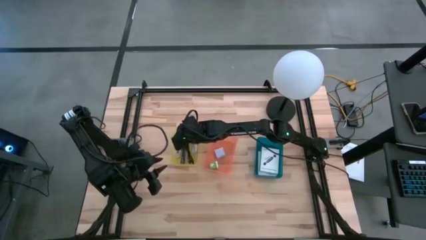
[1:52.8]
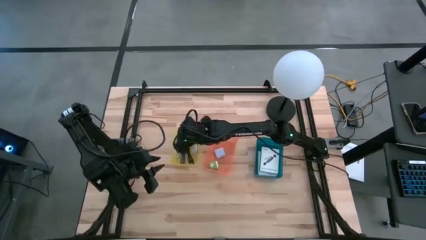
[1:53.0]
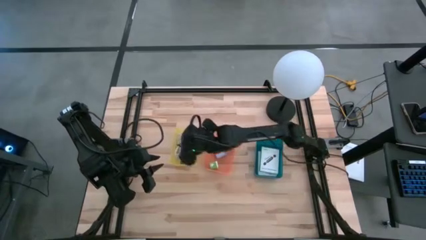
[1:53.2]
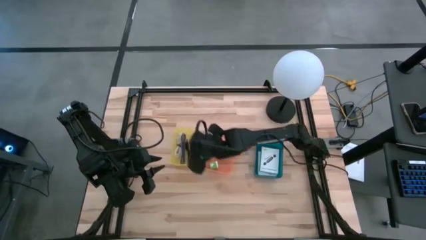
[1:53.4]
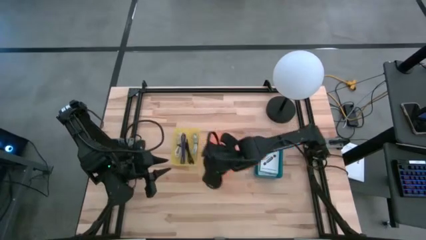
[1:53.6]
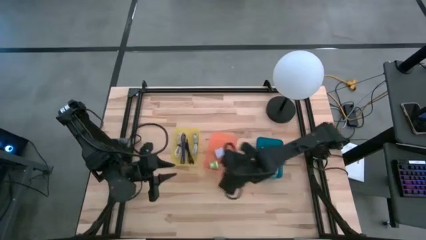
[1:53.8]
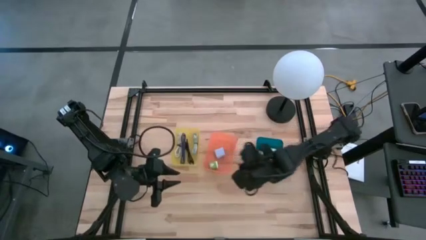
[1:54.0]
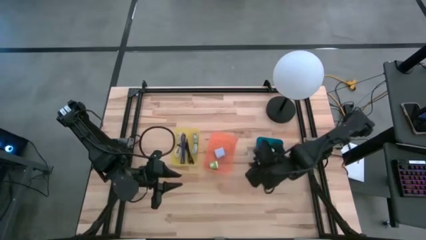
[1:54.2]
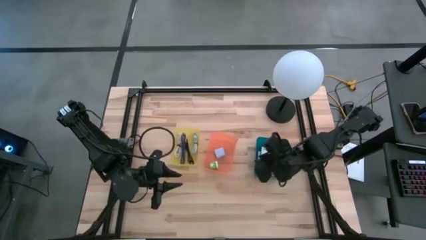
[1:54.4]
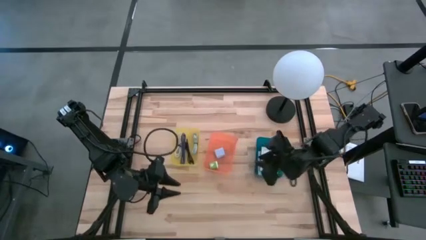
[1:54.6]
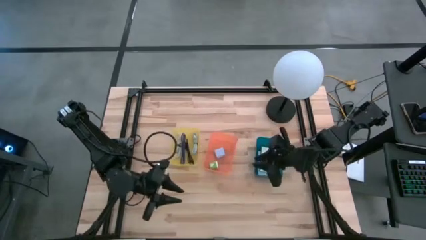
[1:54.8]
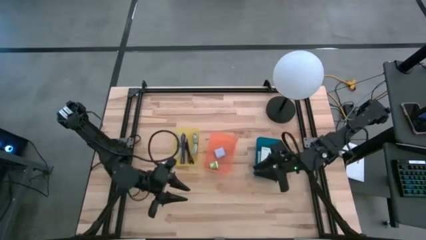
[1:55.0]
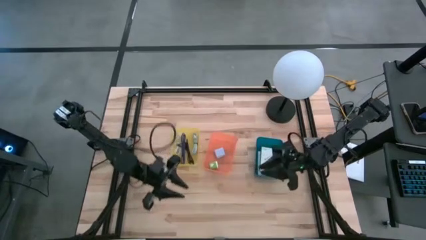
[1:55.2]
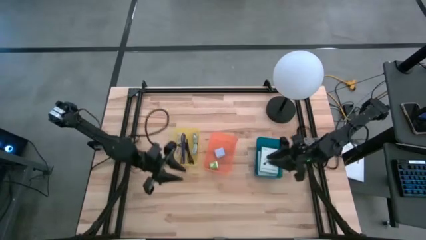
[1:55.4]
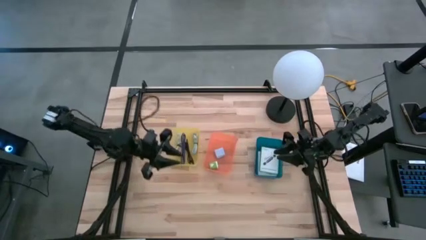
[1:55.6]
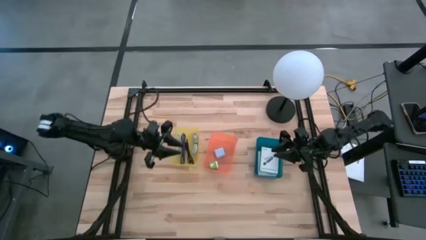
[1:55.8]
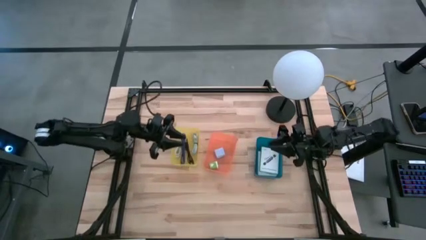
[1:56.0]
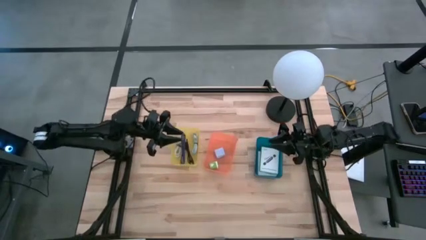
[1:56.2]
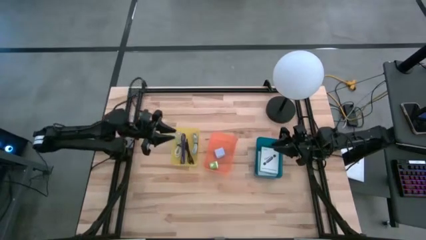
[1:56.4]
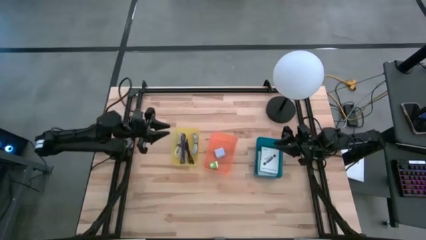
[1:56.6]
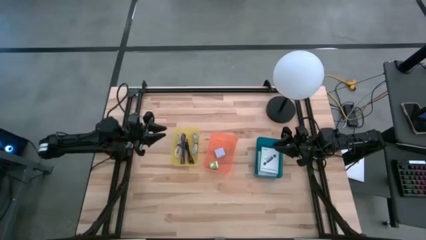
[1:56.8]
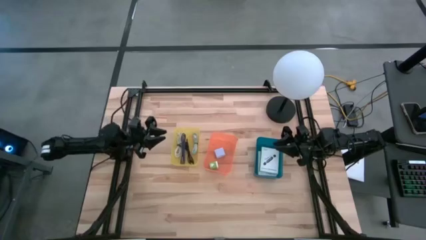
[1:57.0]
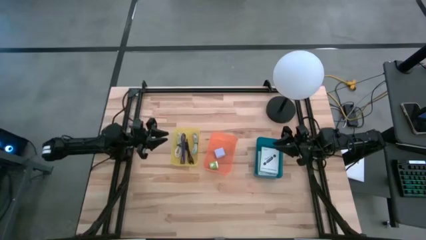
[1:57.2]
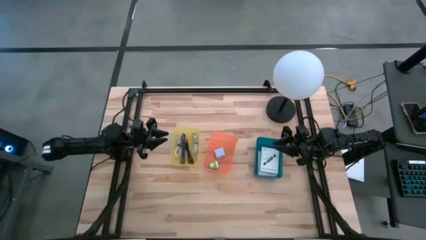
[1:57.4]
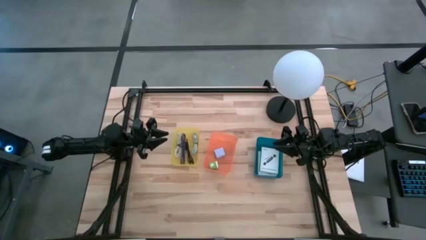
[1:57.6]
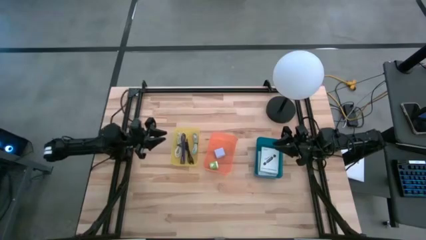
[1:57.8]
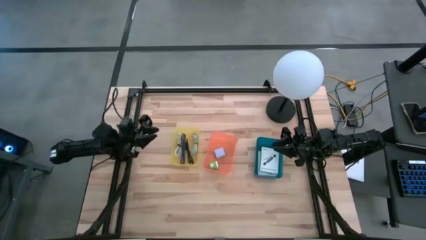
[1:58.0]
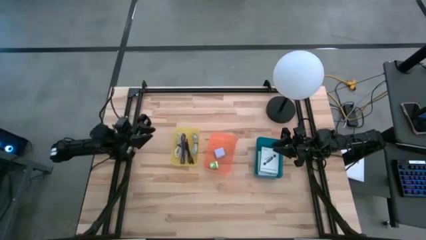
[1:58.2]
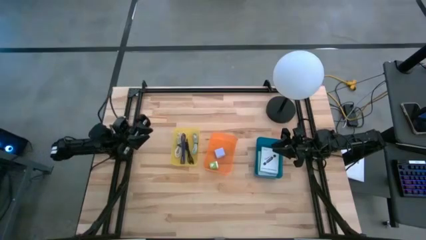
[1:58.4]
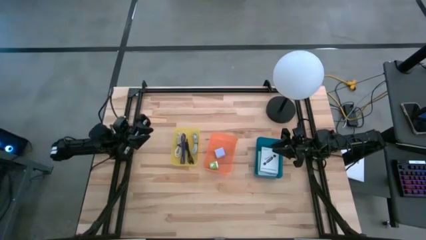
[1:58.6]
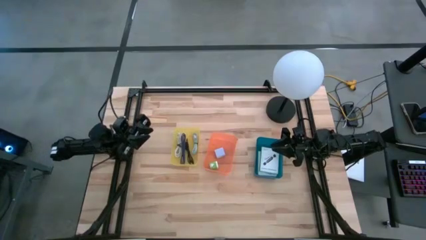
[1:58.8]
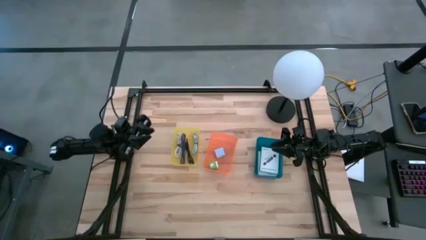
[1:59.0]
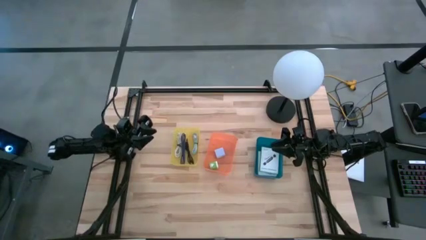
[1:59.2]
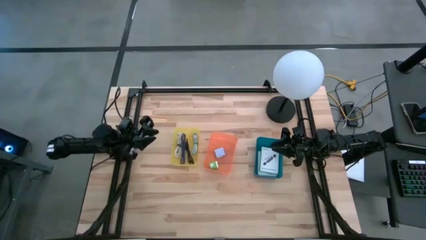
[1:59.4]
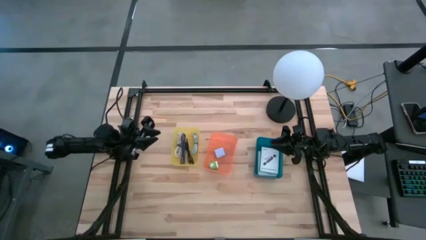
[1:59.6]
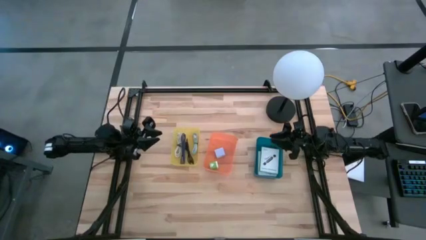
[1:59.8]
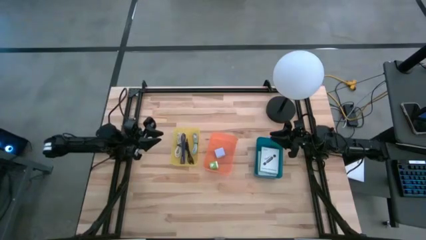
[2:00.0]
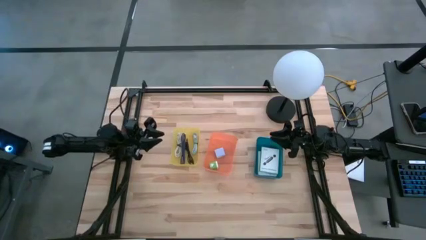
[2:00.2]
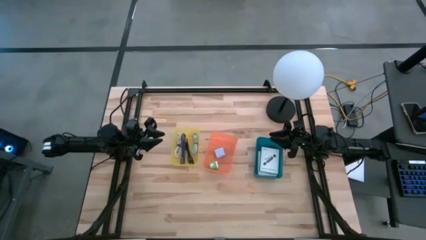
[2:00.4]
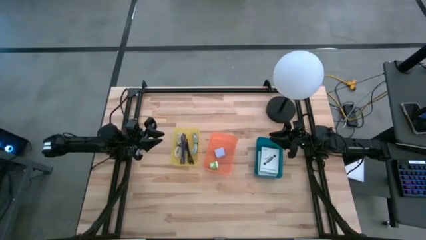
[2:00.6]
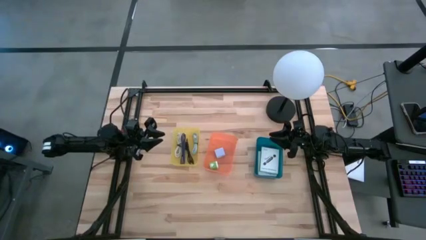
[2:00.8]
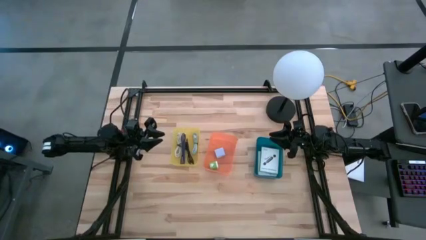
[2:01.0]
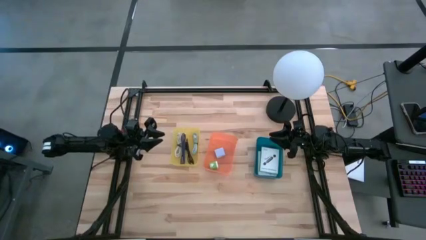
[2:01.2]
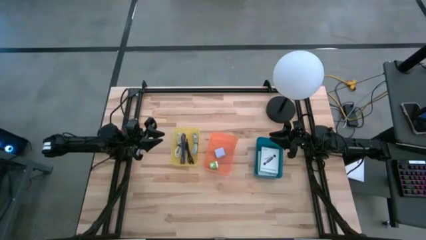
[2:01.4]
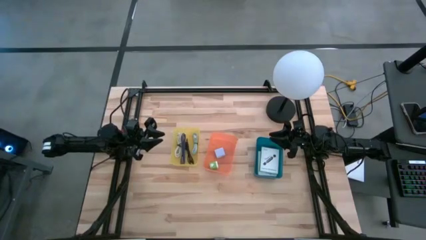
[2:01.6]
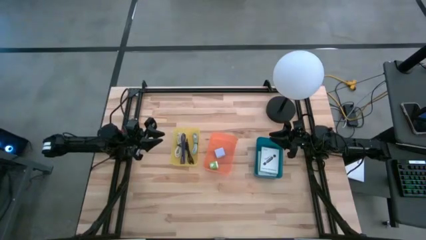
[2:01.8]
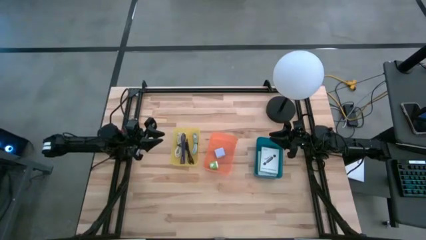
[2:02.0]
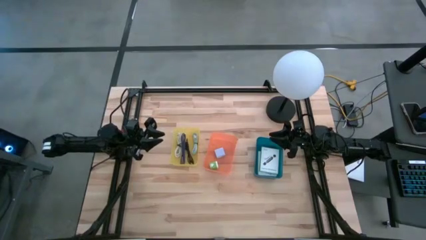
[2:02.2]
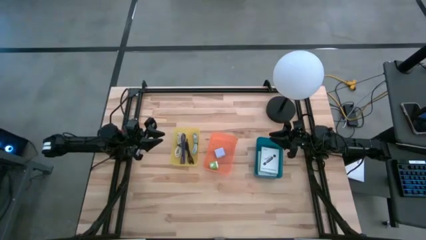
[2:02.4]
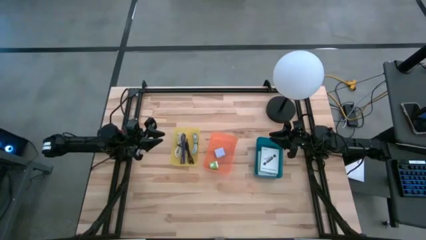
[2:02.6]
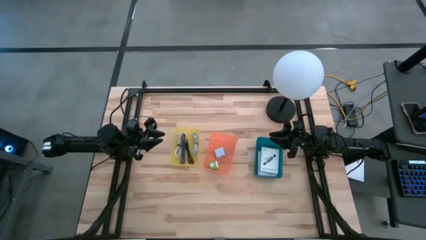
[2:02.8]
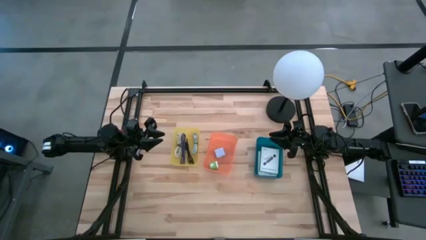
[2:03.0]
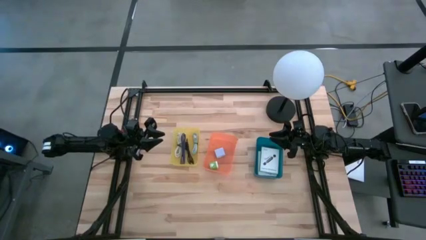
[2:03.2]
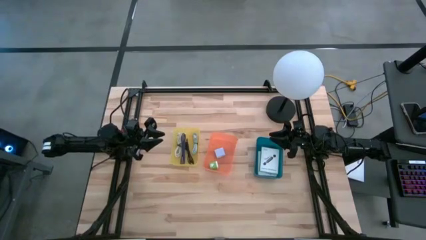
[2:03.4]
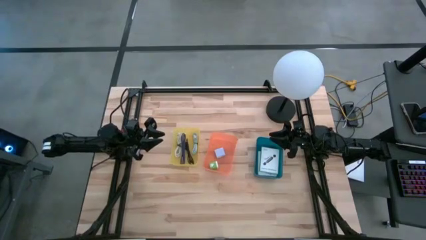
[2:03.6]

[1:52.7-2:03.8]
Task: Pick and place items into bin
Return to Home Position

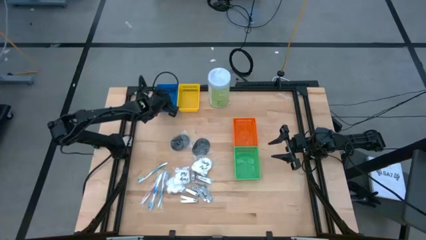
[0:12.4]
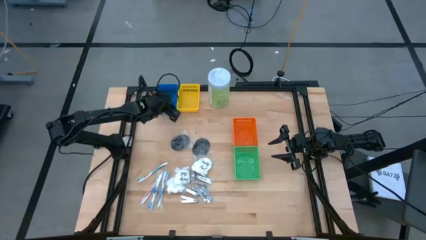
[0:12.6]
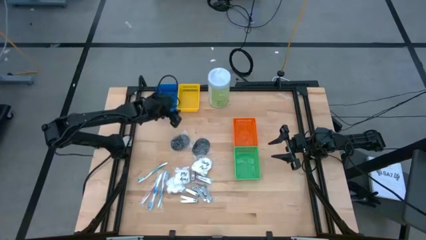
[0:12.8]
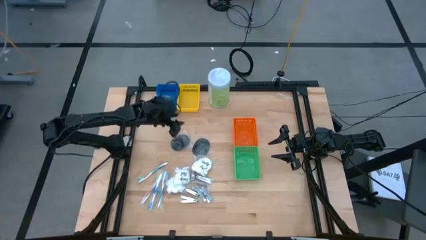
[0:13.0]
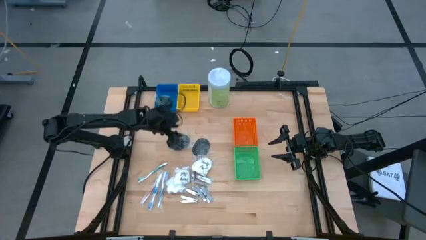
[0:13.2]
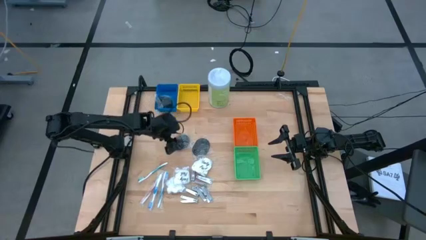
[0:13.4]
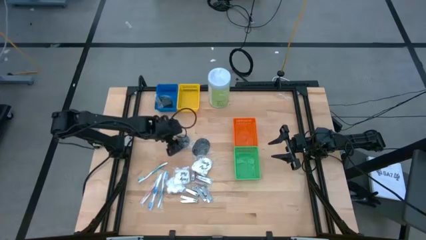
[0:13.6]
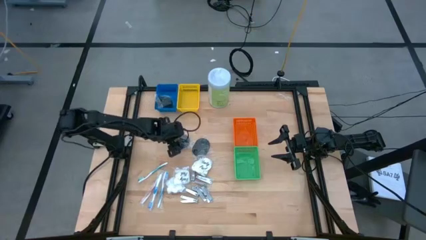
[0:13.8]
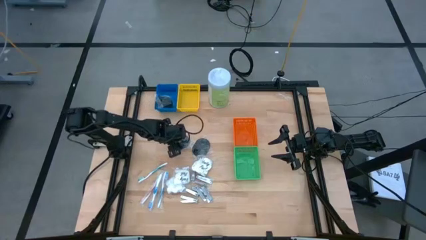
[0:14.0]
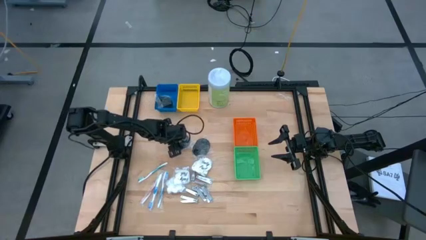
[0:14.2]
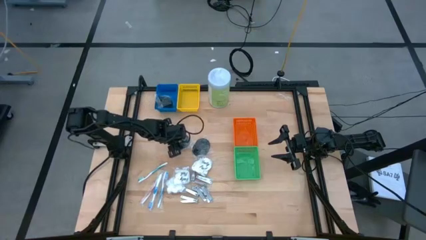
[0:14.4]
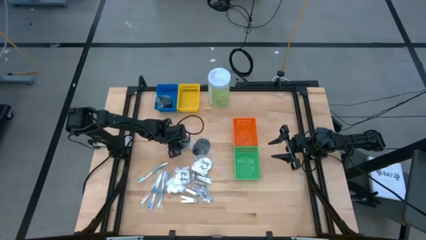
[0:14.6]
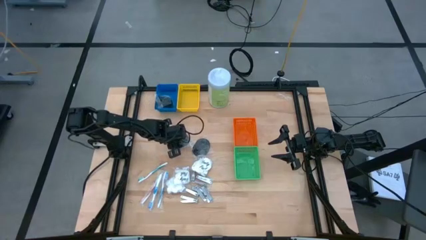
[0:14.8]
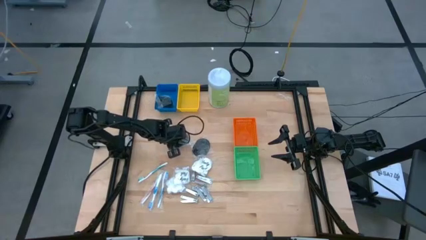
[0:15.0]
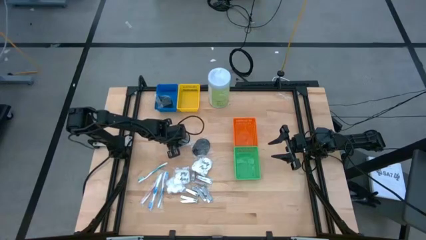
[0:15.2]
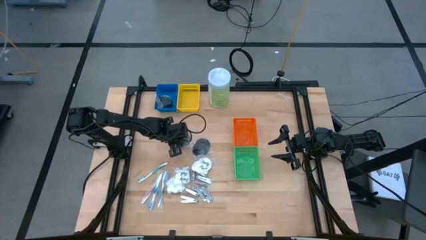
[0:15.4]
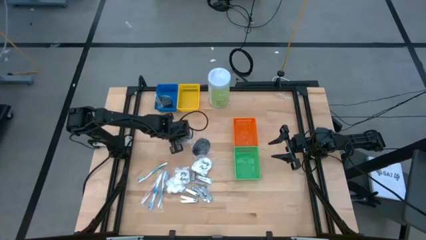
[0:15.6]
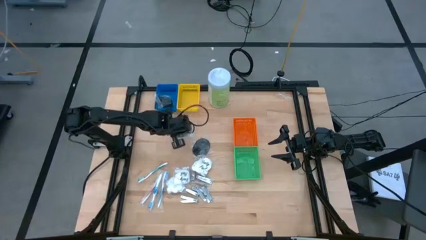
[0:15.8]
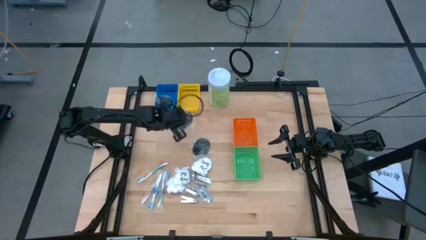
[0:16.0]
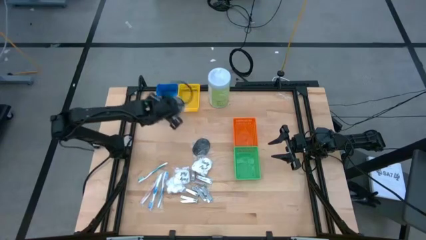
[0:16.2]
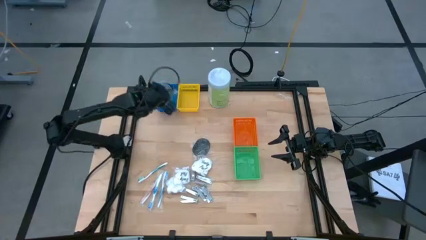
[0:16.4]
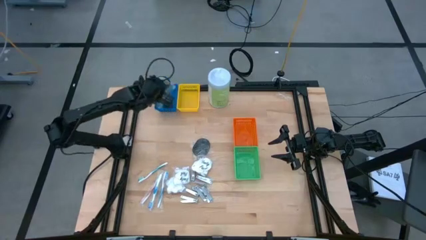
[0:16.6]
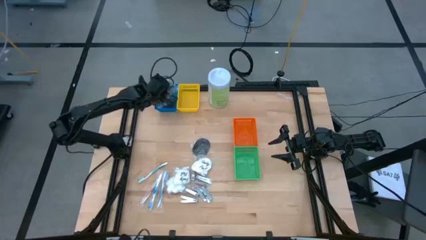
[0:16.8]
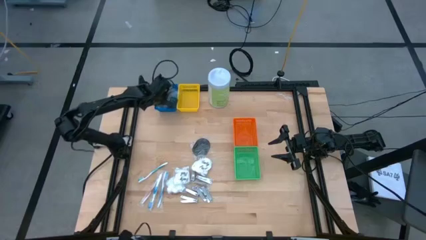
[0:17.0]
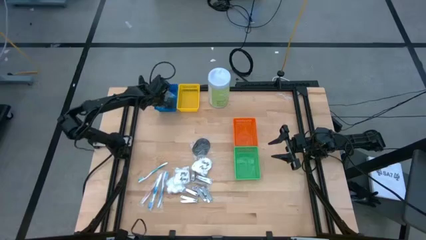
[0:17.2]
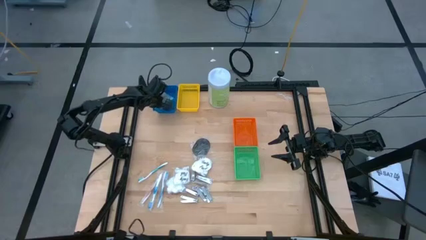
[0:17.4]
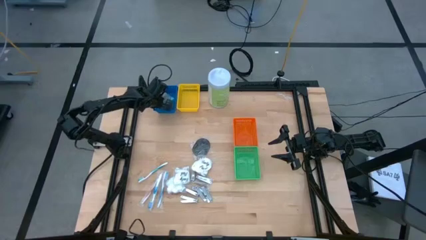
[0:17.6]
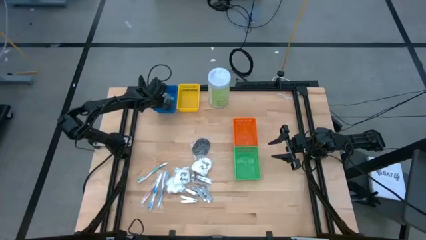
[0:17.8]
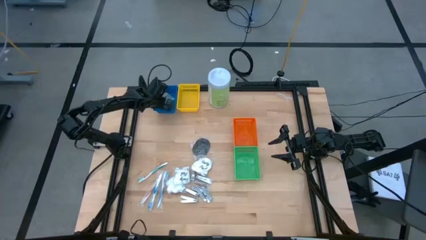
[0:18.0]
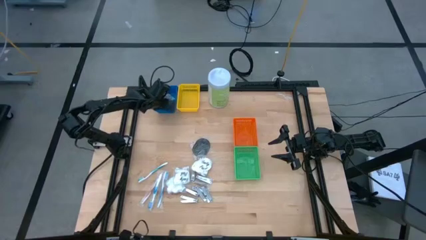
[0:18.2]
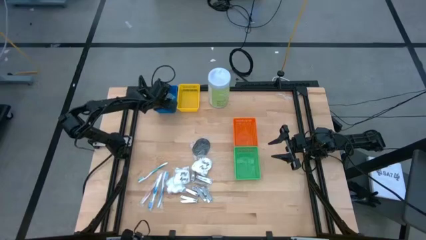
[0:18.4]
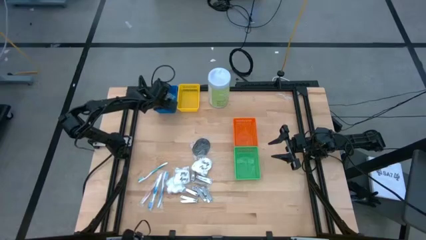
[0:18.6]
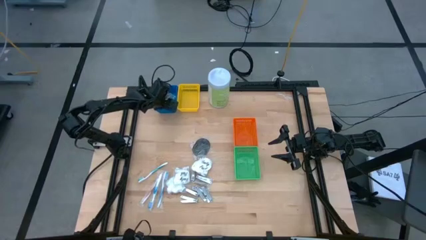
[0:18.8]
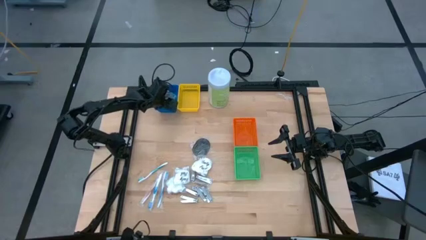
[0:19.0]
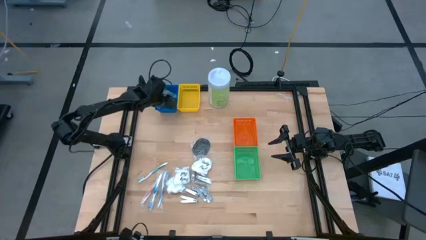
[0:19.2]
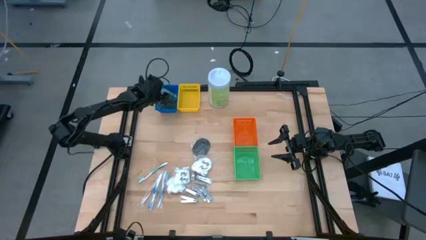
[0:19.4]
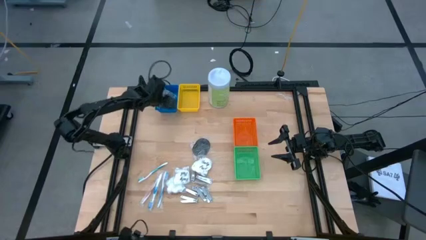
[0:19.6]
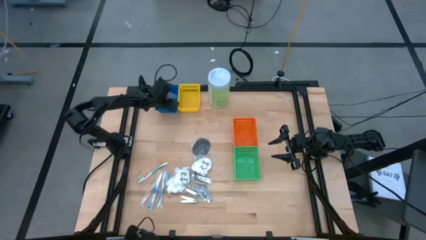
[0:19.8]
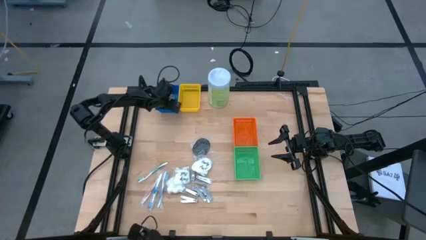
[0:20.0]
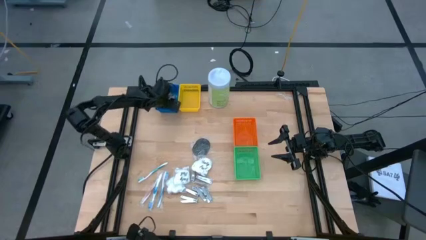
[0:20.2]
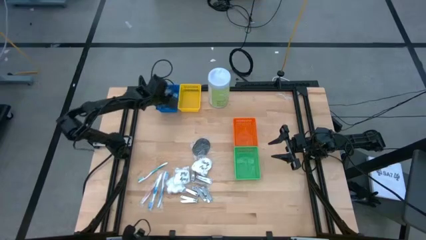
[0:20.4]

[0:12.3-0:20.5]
Task: Pick & Place Travel size toiletries
Put the black hairbrush into the blue bin
